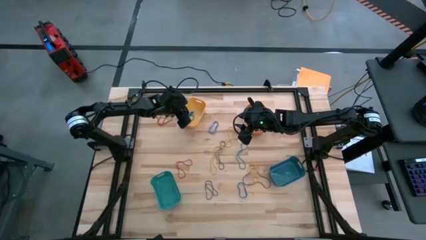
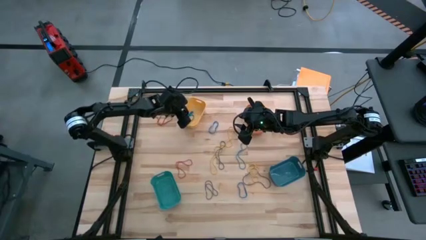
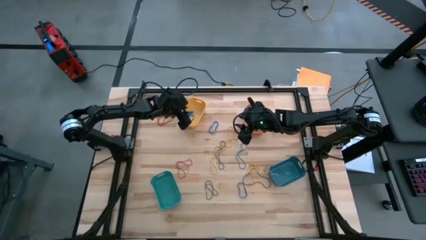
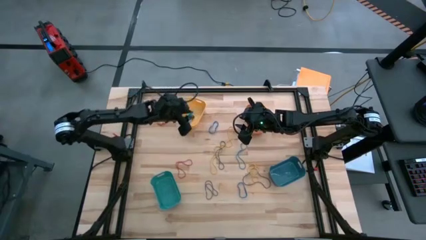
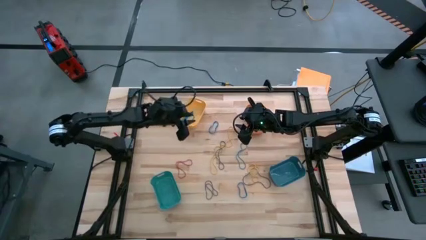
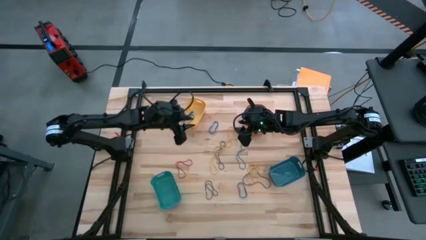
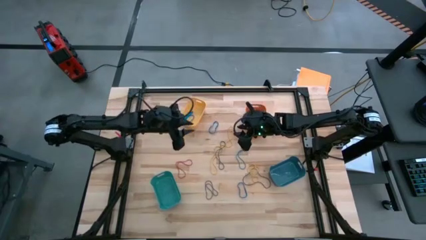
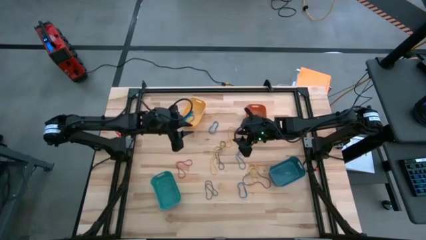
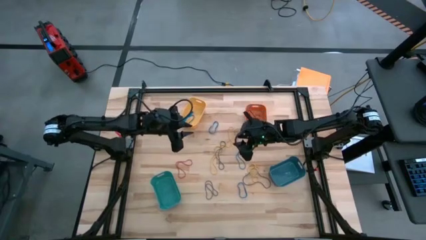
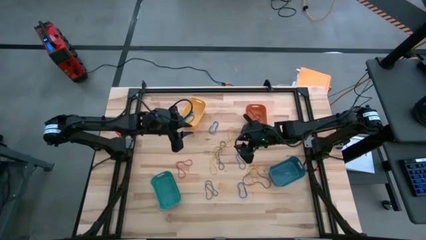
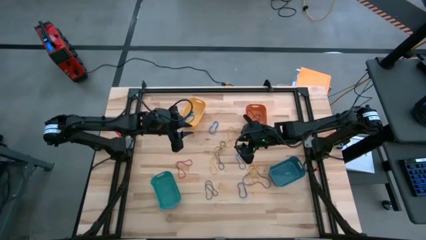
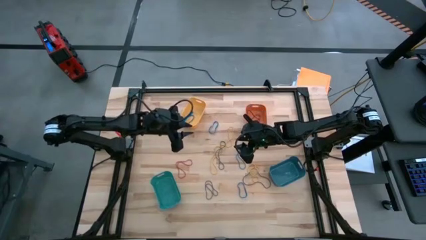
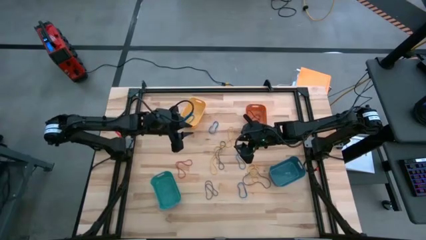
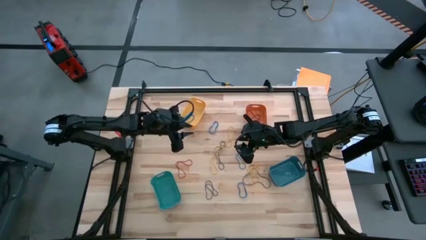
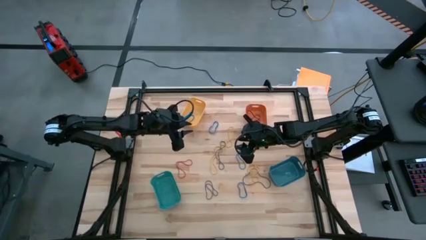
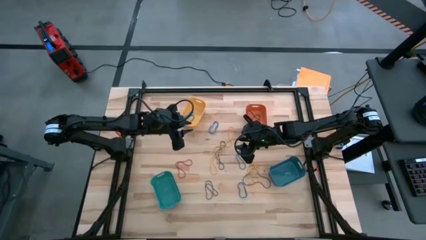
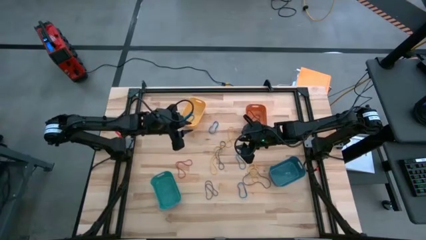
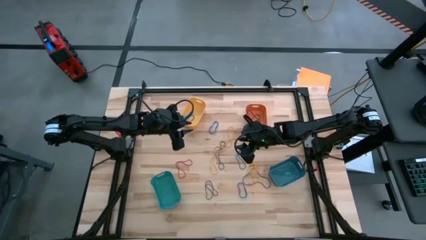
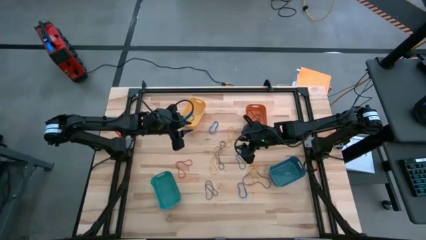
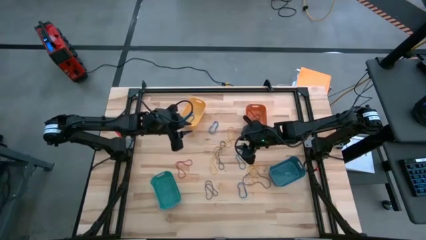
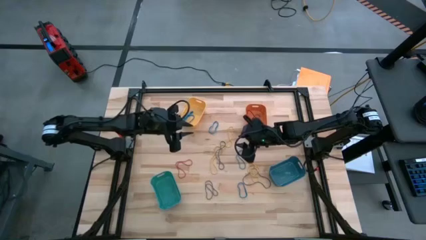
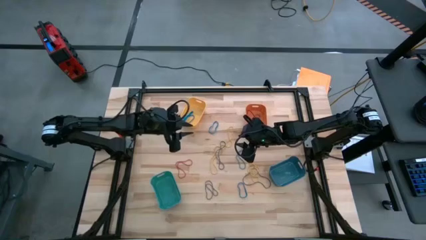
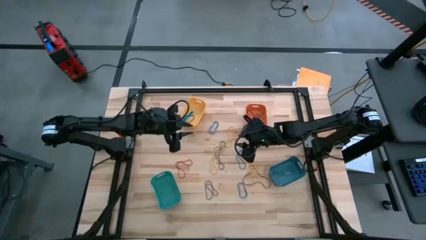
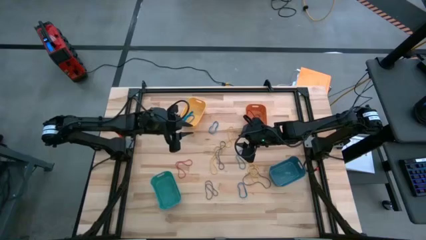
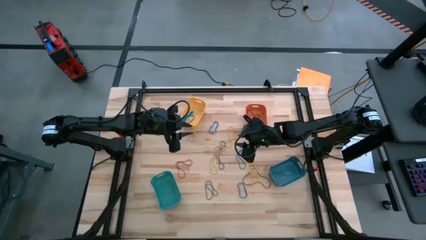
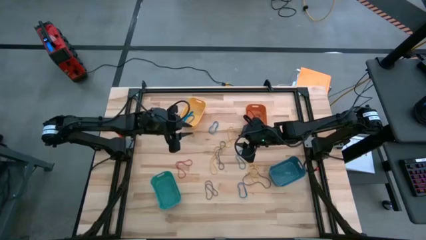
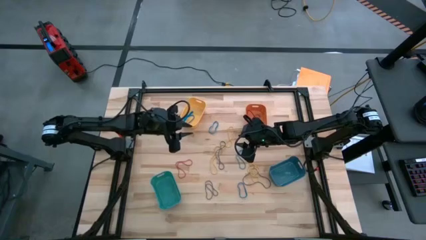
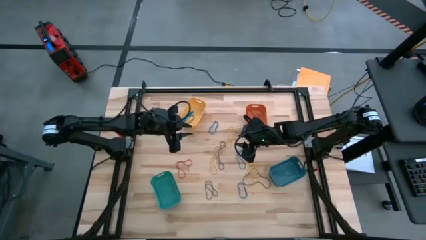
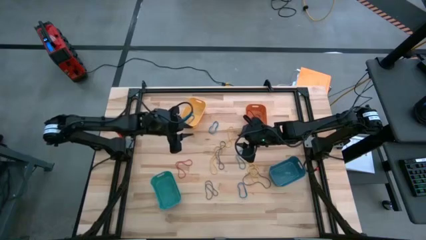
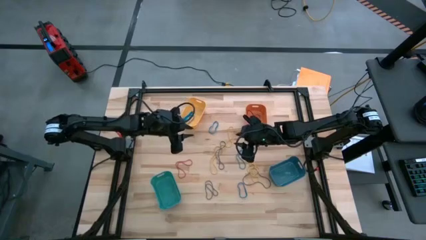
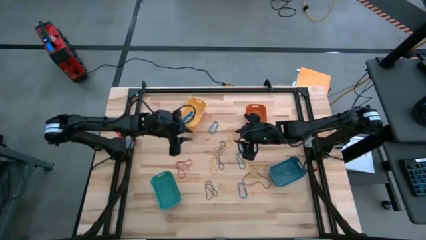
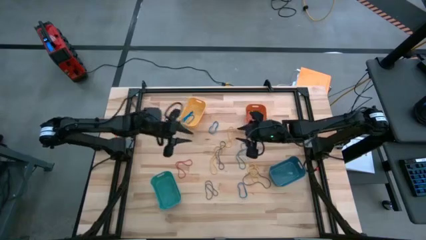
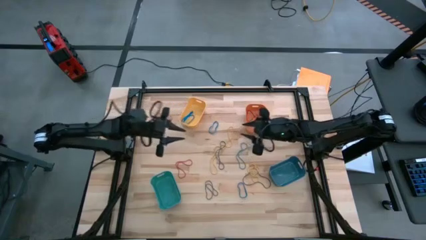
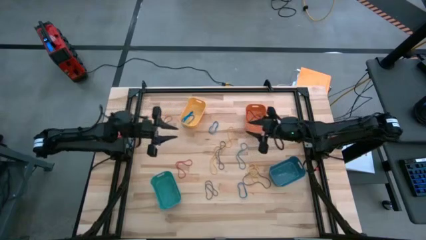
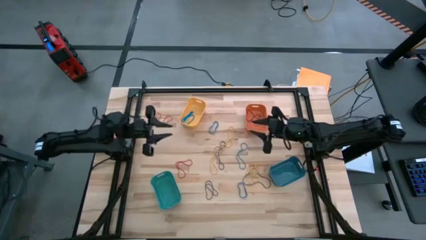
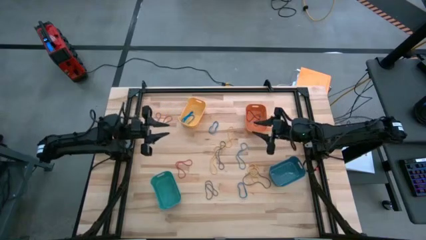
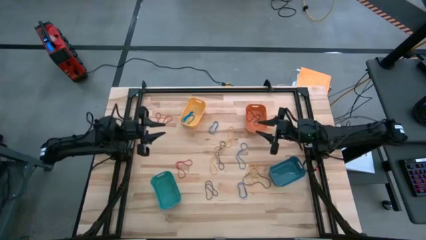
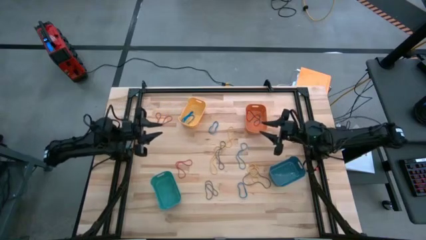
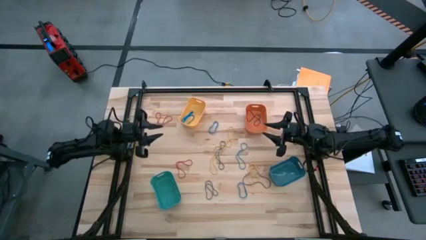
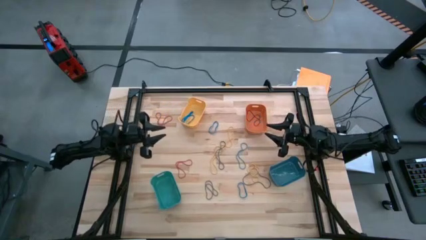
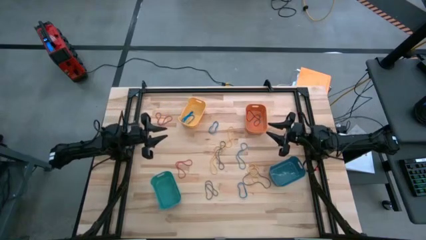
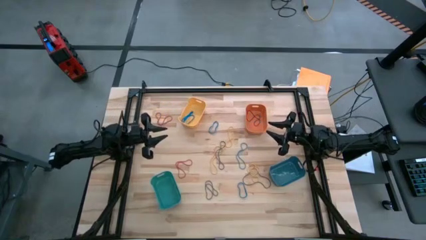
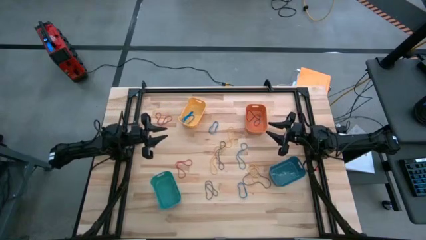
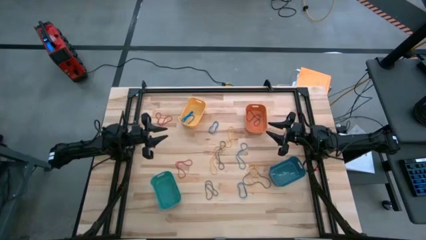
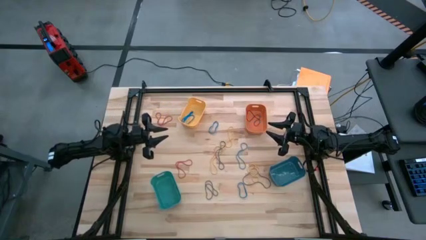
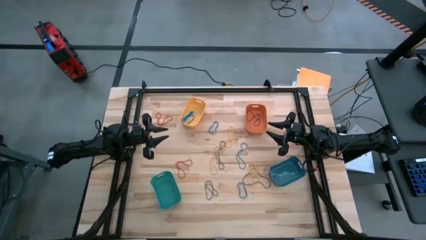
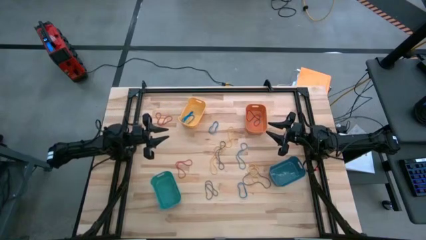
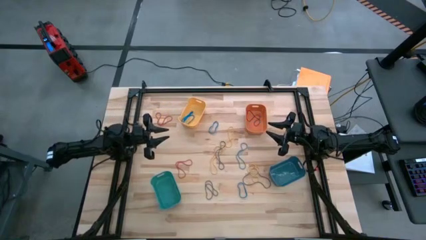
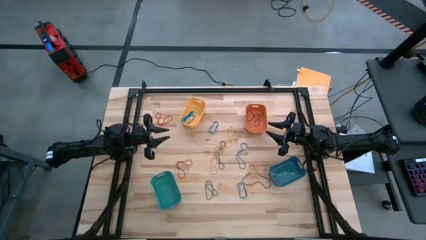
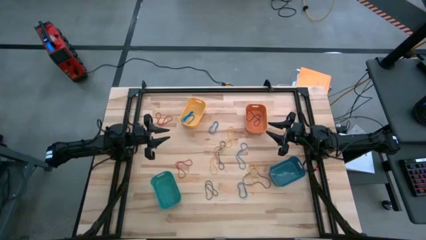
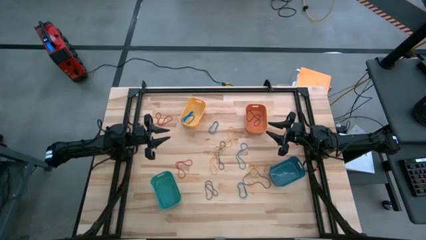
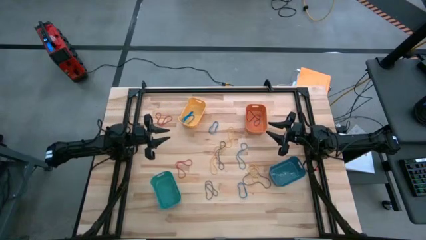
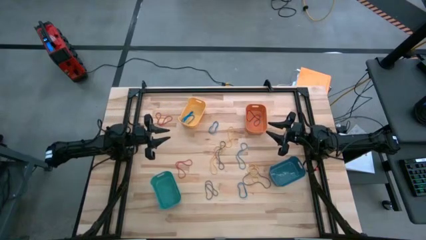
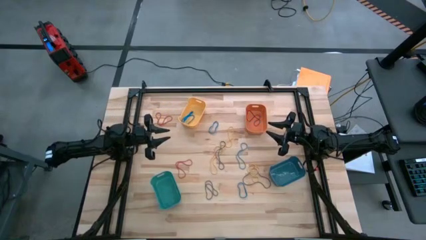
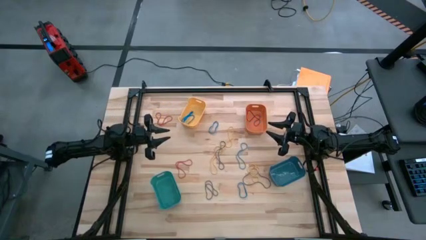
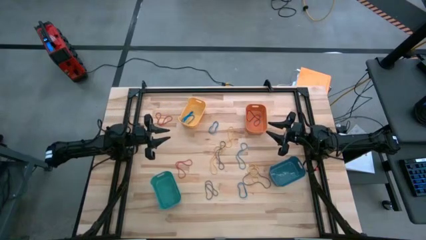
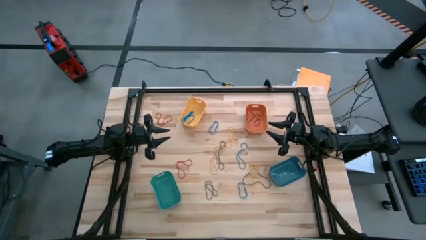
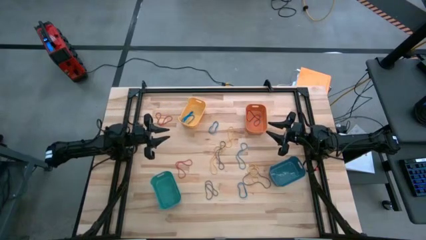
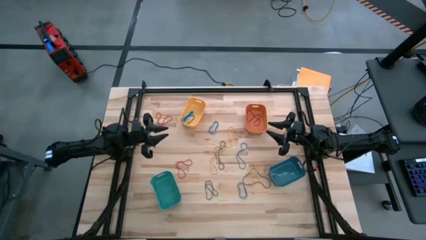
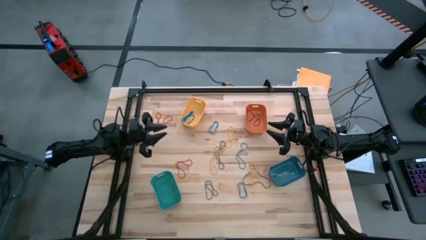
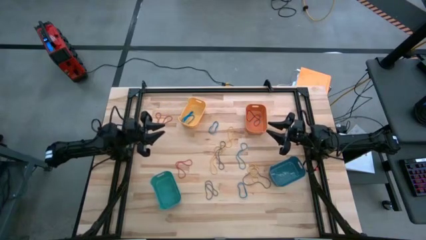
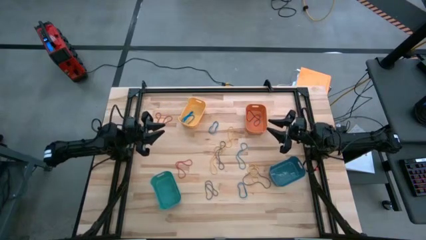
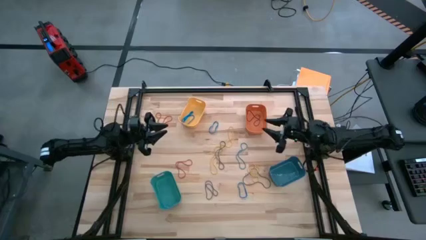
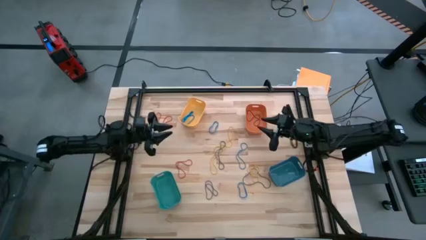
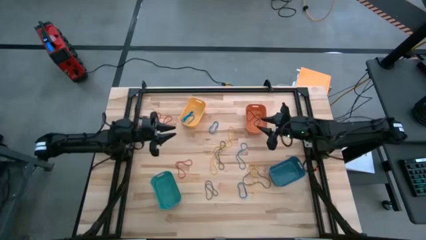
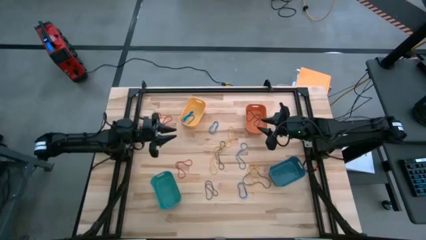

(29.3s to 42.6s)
Task: Sort rubber bands into baskets
Put the red rubber band into the orange bin
